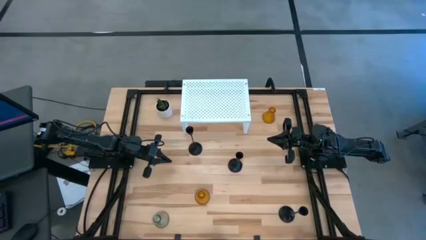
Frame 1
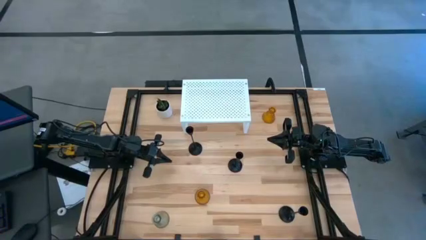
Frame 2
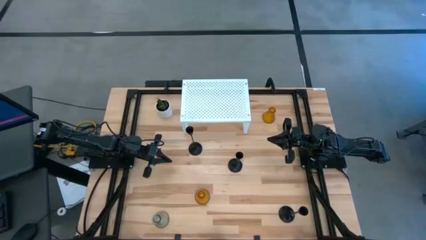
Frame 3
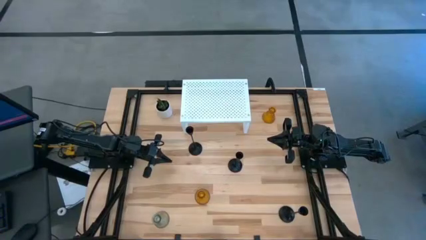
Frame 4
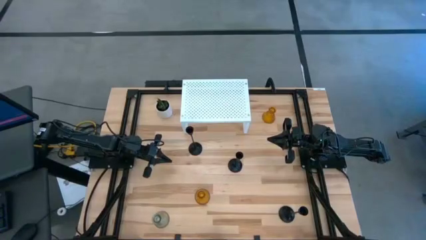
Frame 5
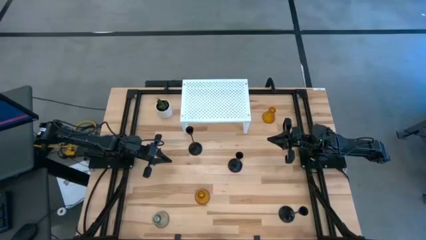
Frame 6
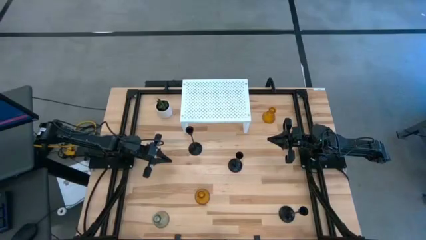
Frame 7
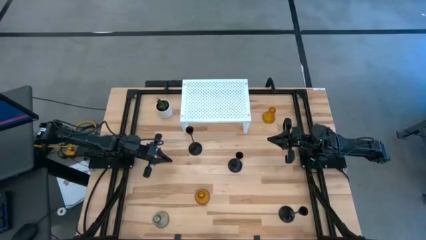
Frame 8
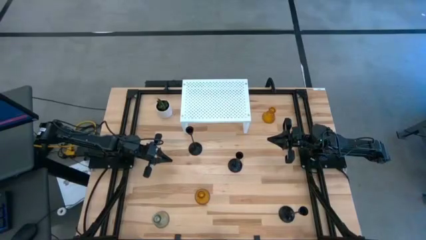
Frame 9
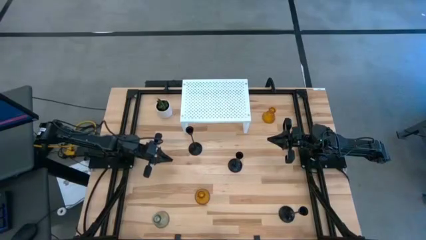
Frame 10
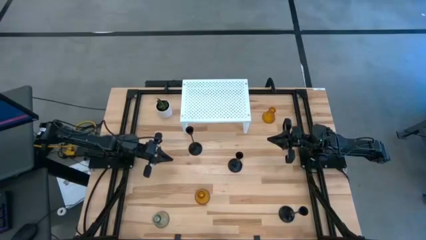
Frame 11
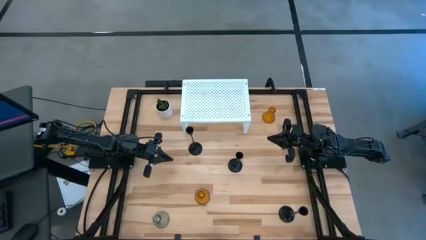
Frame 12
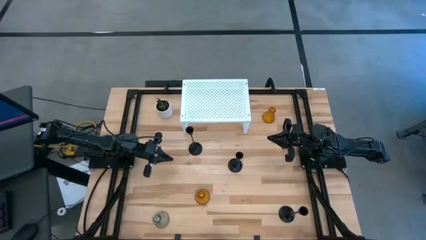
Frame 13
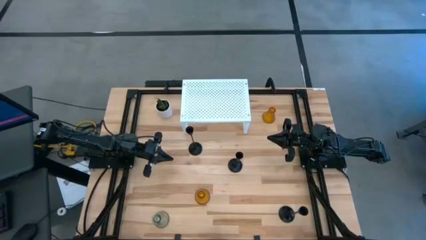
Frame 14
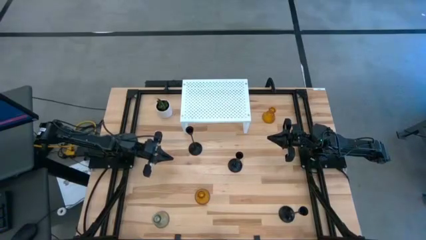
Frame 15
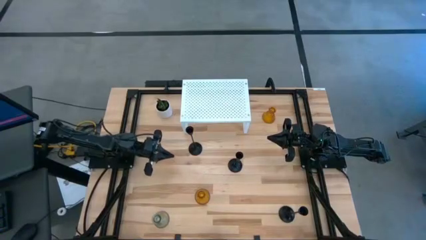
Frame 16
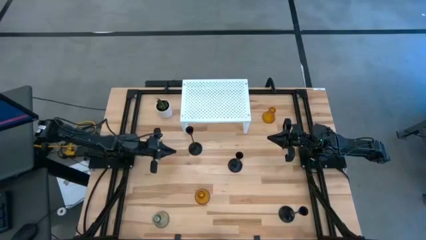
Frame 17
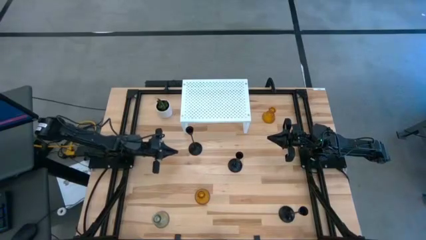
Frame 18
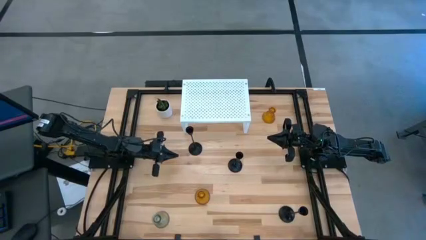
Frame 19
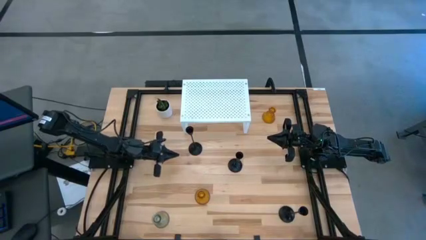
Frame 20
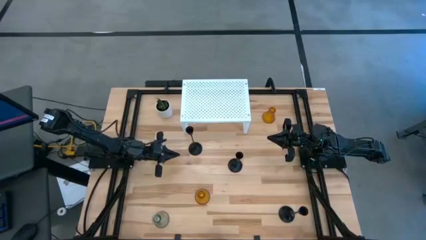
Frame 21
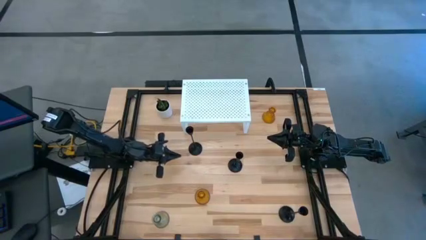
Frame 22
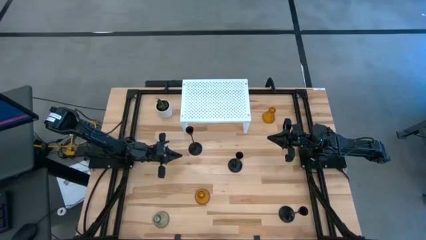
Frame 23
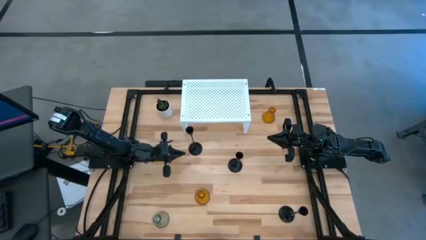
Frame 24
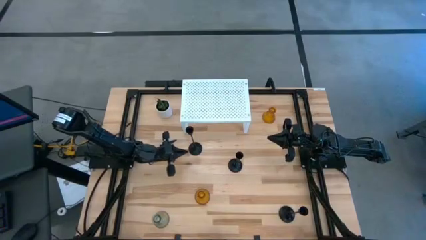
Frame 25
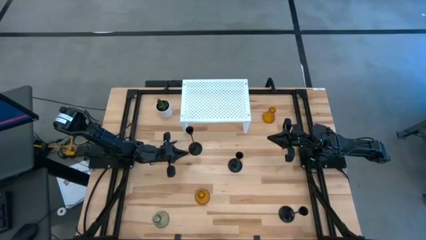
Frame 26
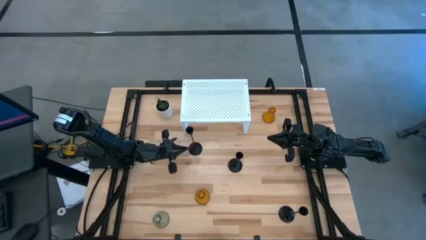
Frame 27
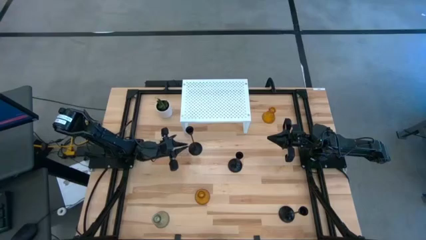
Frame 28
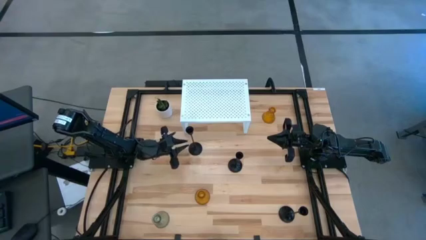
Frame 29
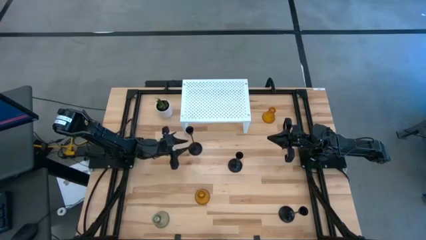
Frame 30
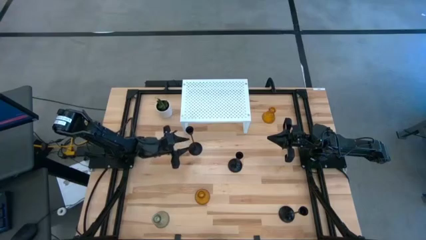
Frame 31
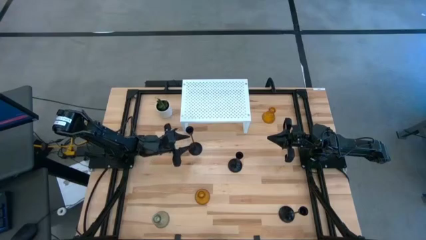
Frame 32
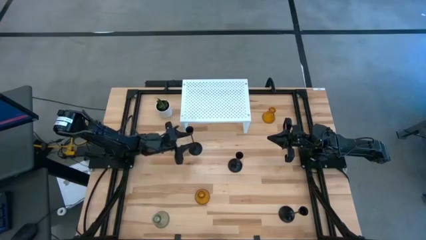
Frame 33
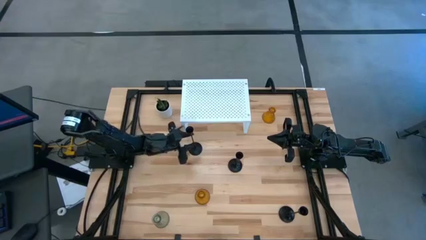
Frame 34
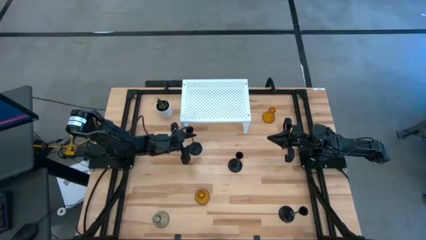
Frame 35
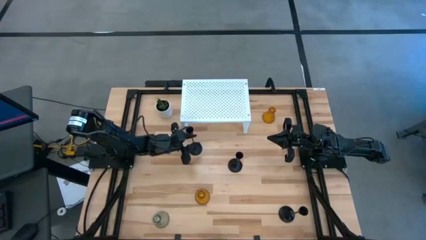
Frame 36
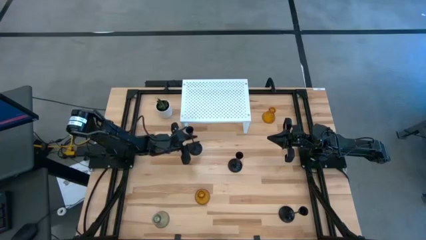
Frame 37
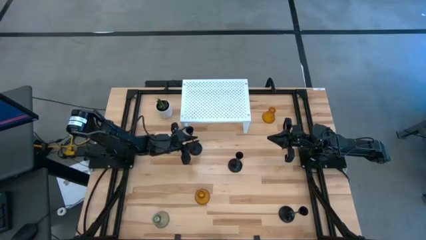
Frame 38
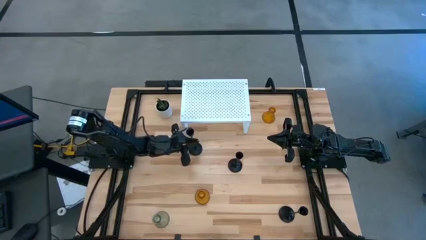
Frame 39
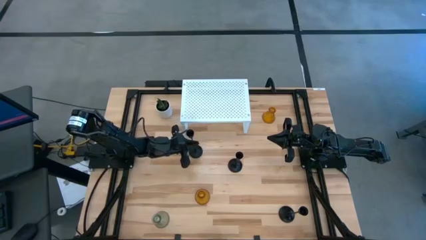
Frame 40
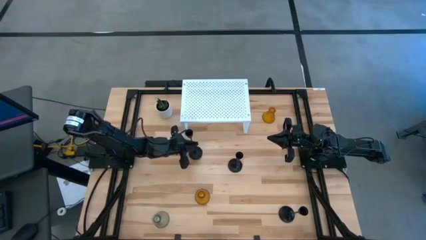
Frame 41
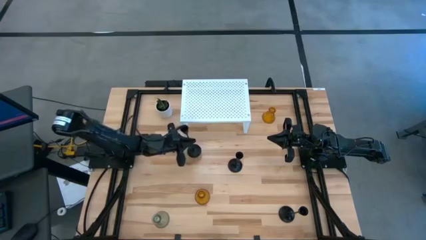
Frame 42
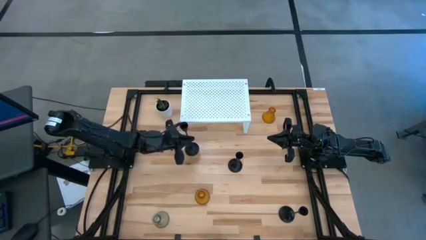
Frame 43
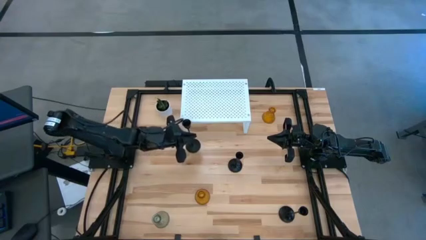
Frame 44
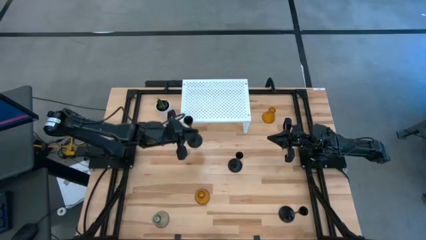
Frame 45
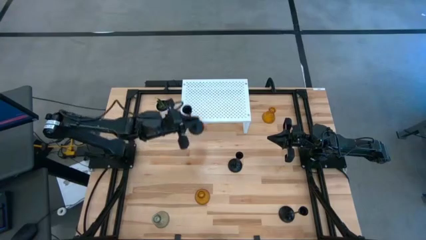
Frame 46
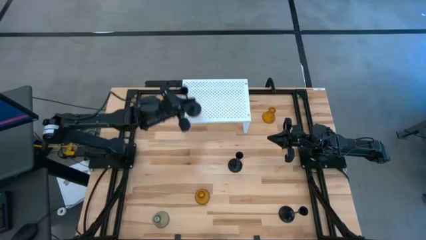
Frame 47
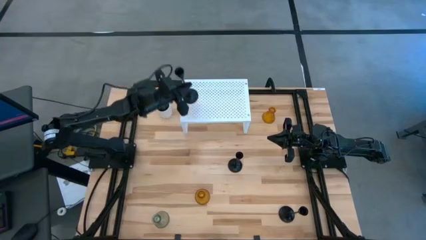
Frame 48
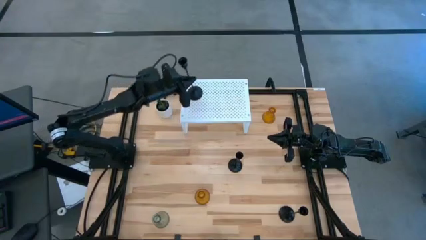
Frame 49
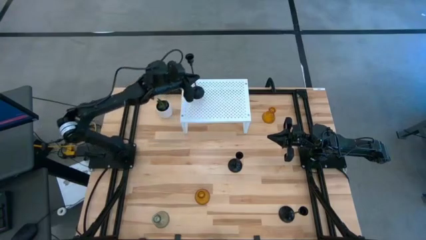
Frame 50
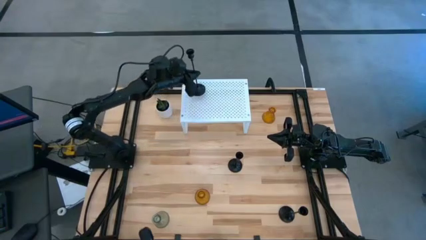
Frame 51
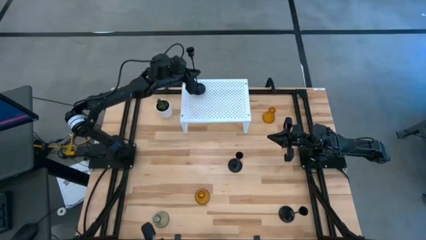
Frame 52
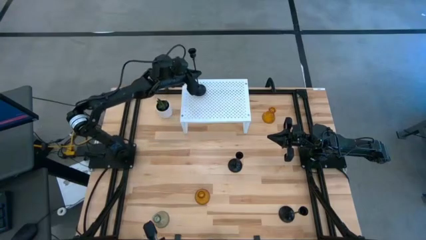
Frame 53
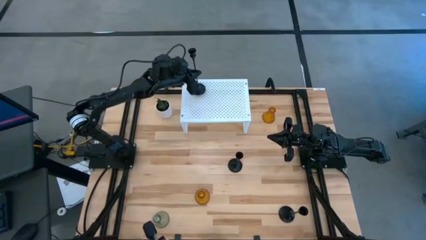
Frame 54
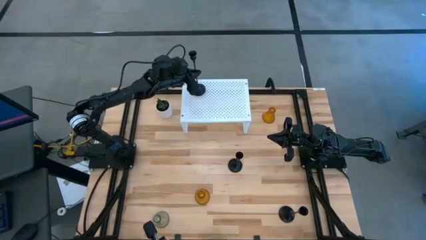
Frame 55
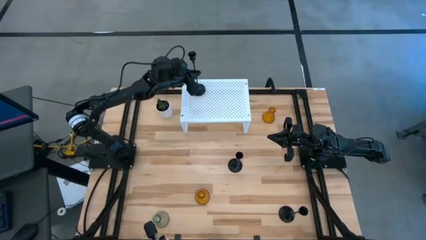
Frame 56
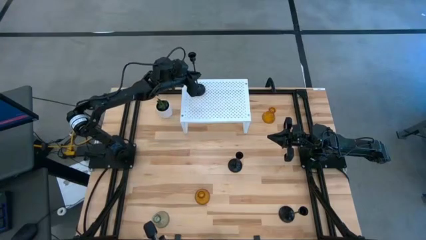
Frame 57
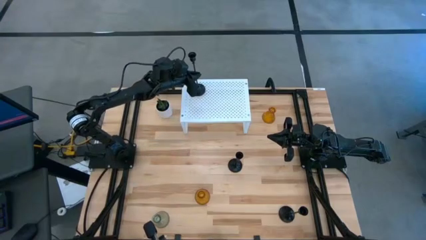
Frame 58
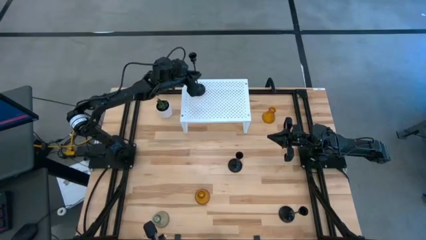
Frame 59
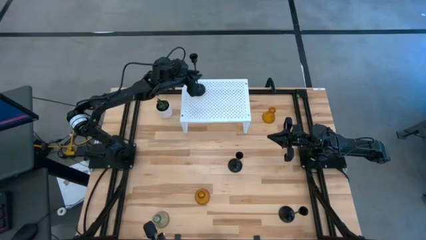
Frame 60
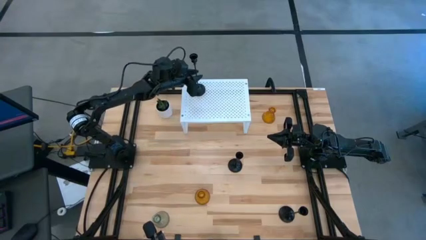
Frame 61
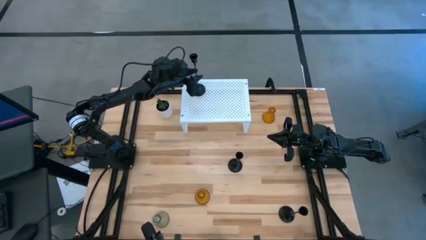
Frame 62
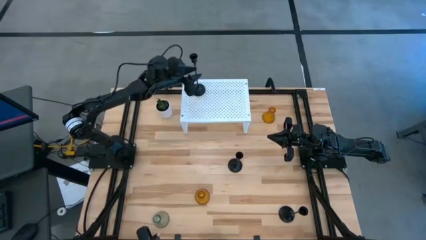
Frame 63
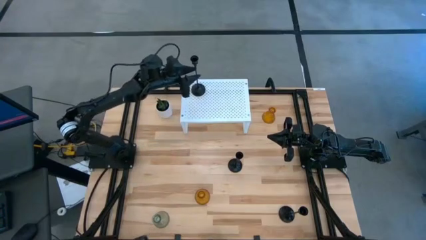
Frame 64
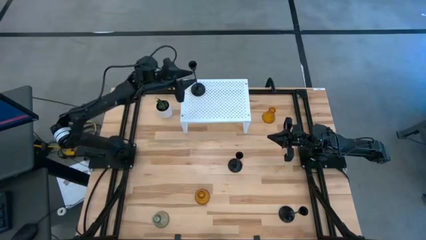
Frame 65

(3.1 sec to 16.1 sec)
Task: Pick & Place candle stick holders
Put the top black candle holder on the shelf
